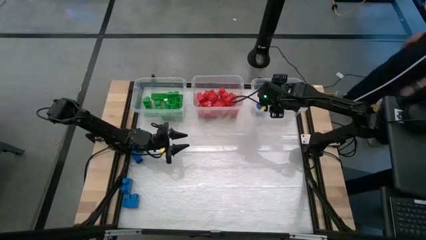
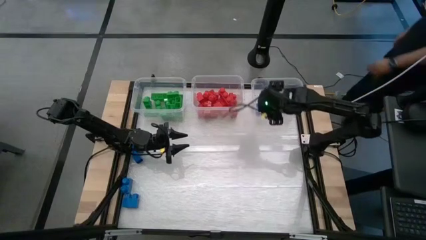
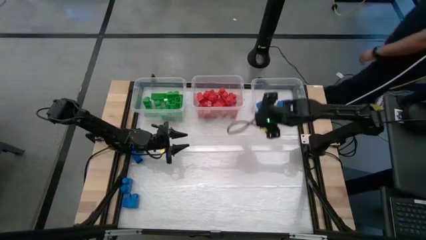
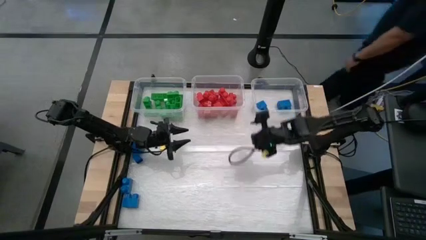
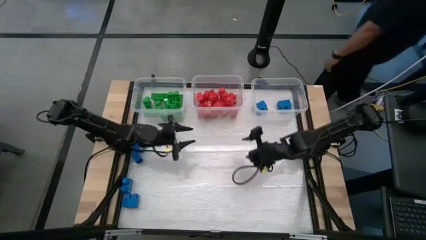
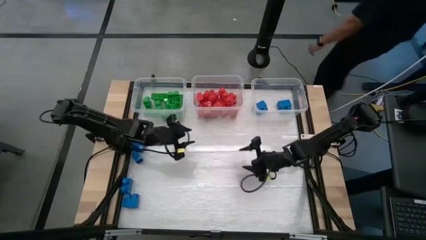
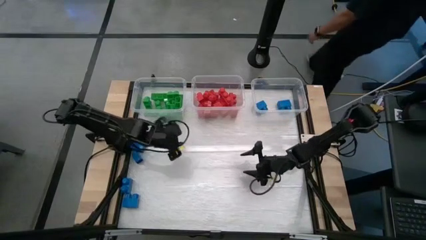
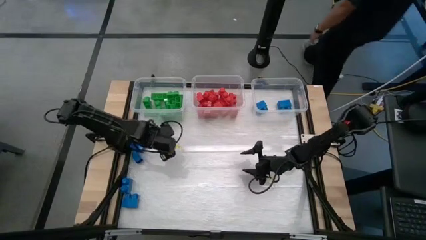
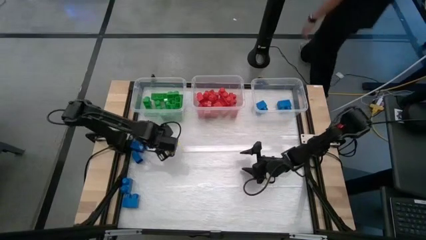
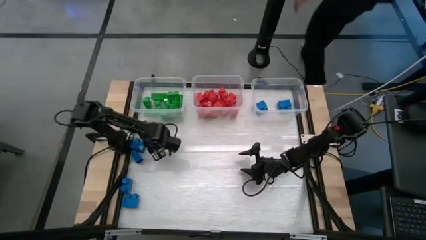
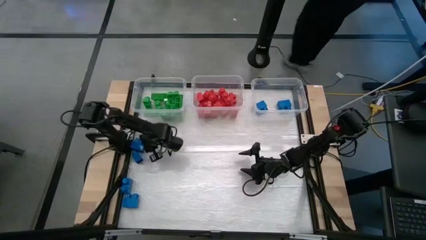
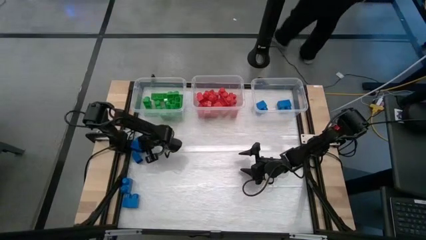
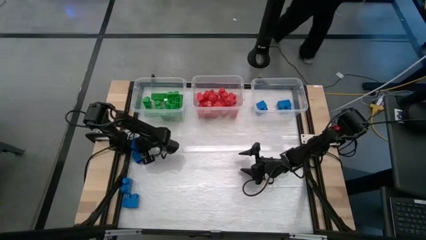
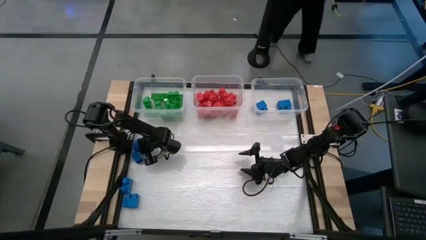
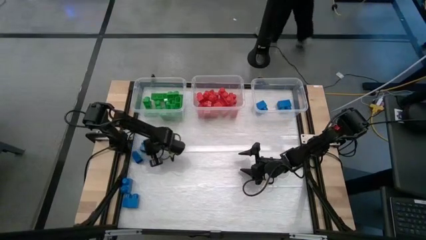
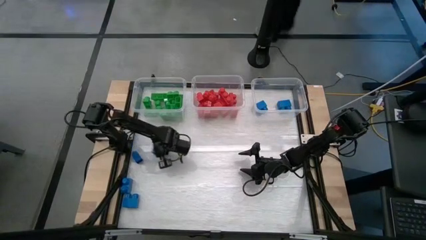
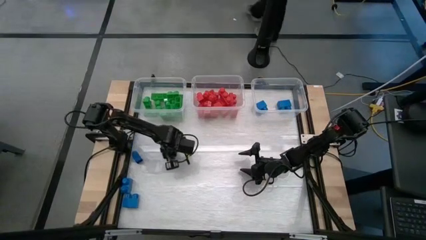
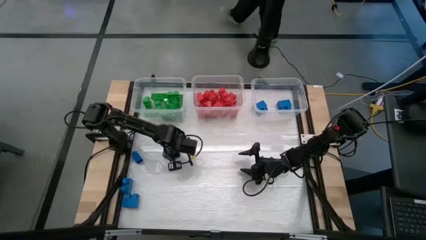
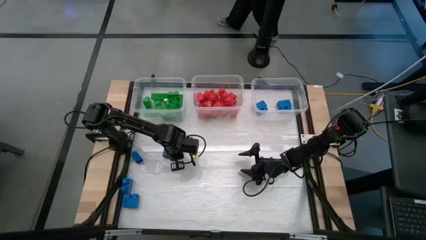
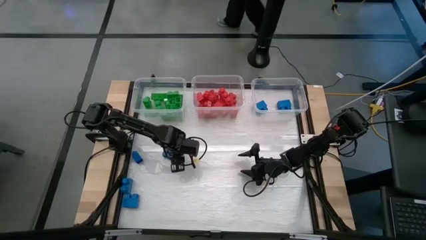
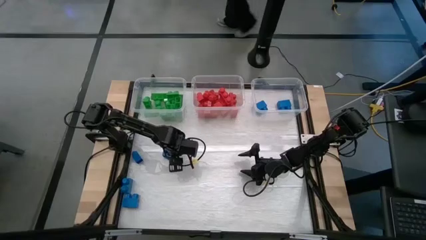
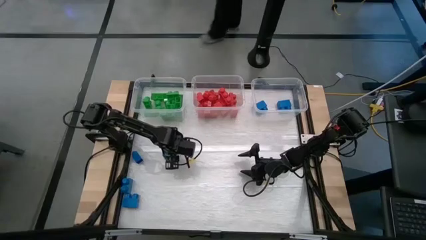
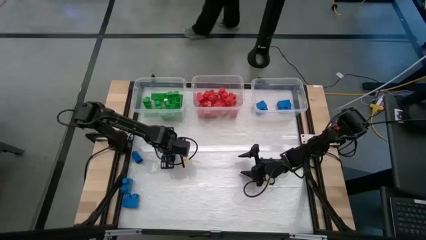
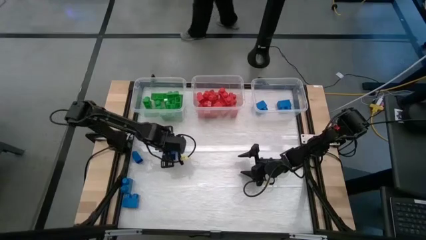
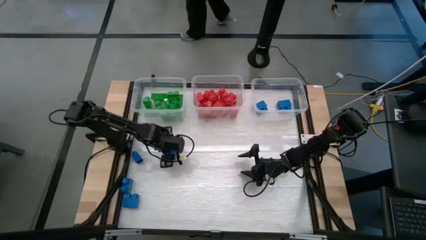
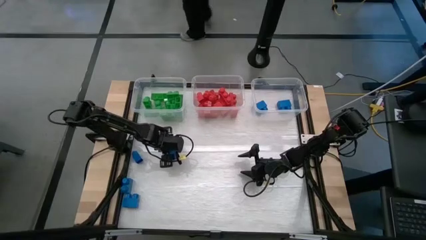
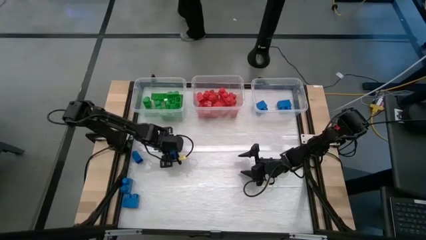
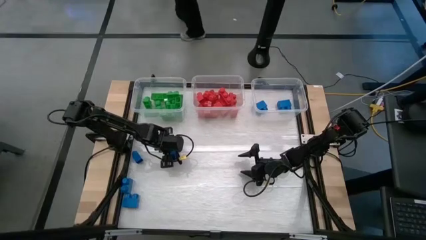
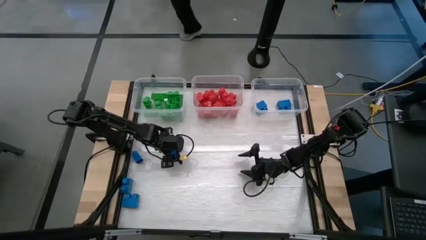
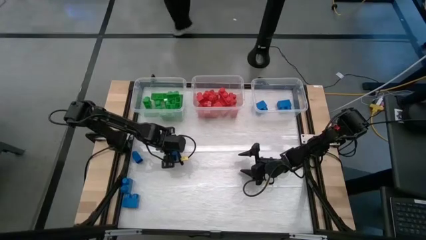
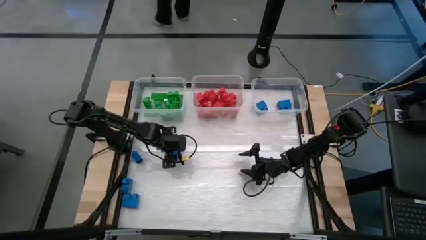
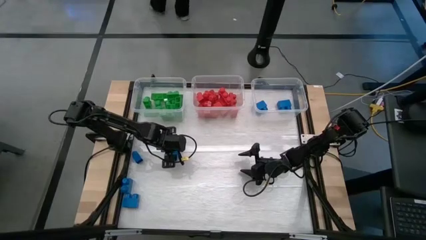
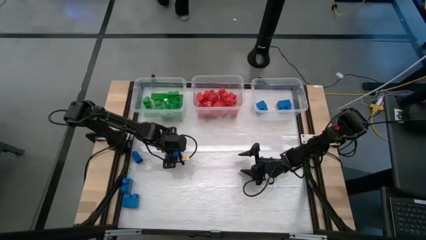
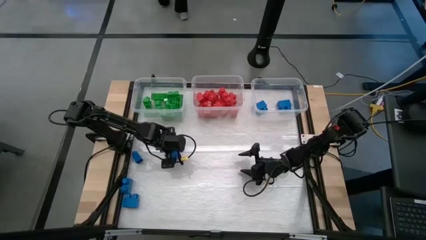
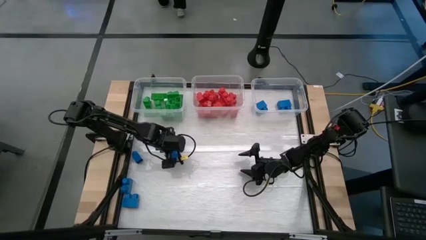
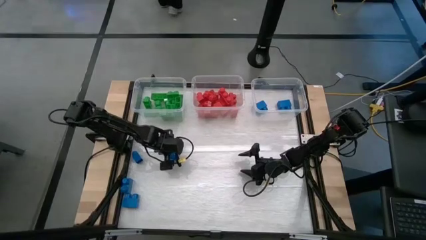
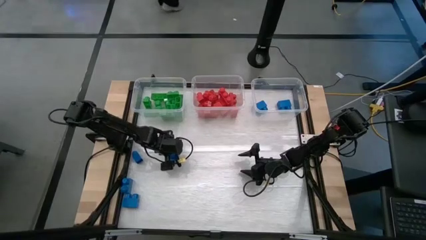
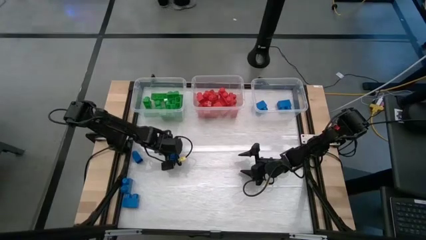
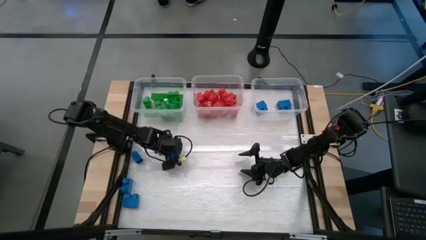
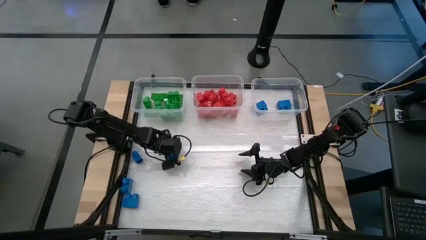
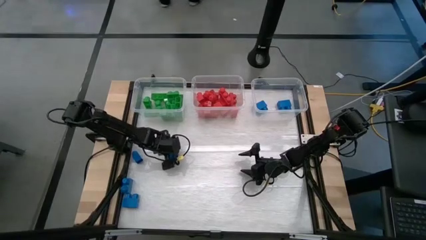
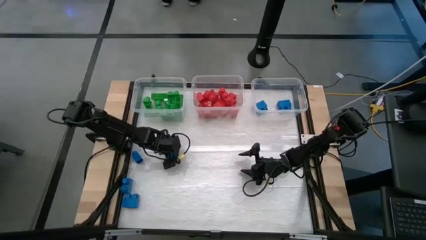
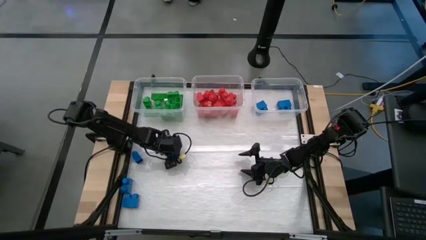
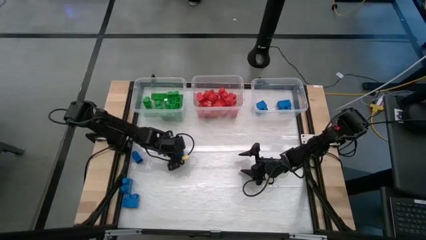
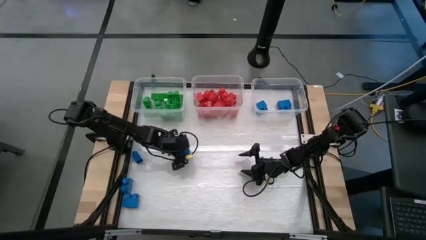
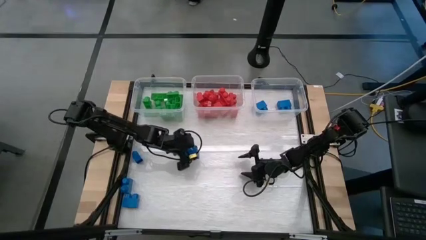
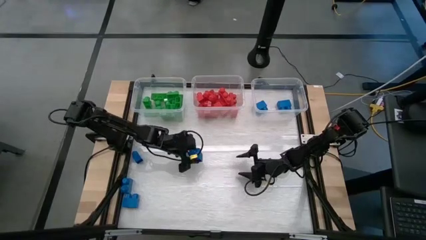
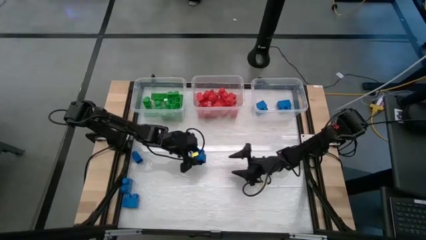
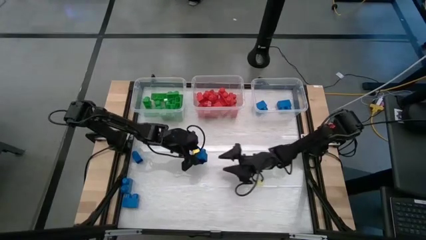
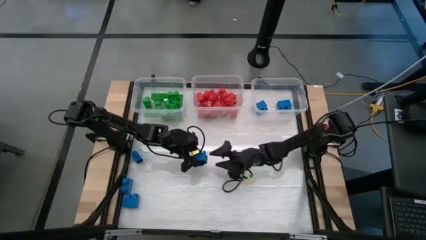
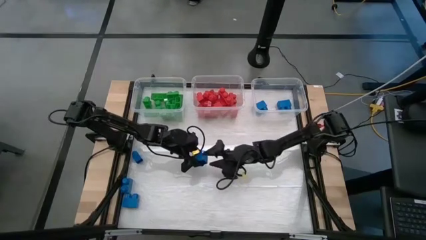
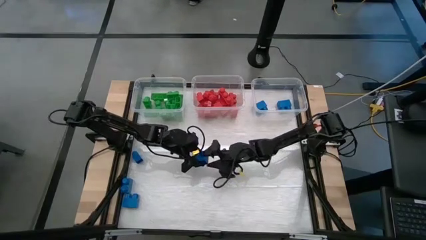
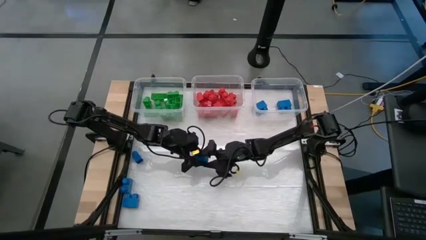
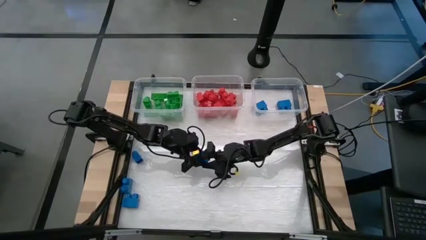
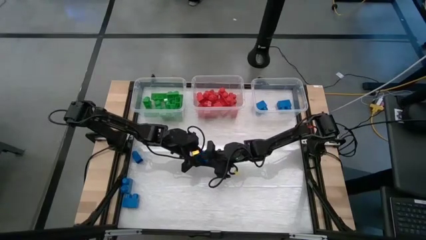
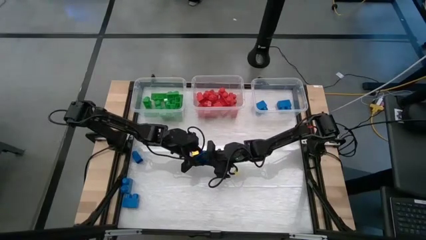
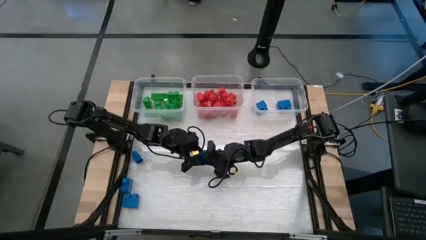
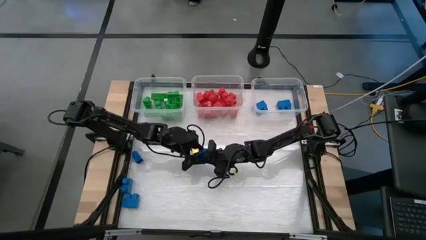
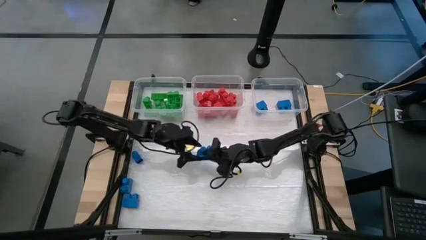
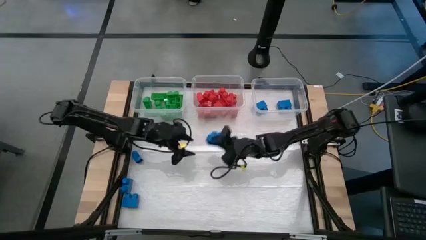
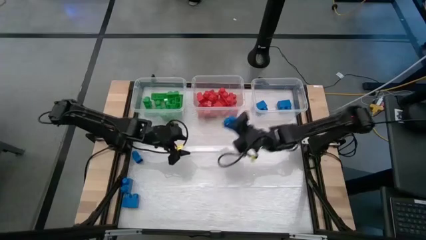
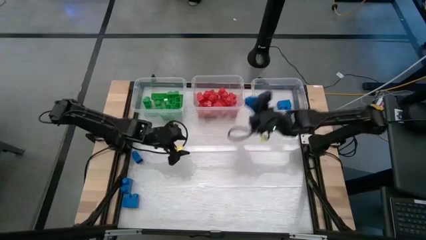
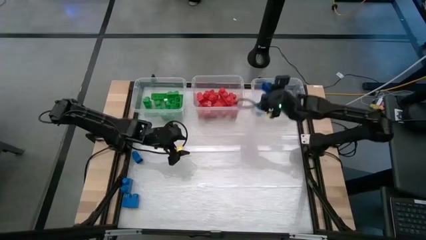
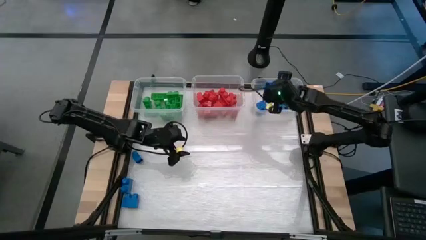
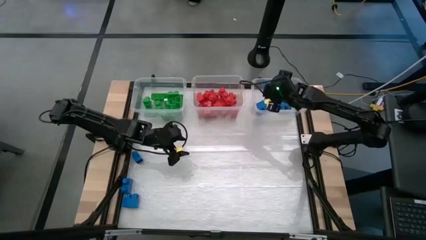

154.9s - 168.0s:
Task: Sort blocks
Put the blue game piece into the right transparent bin

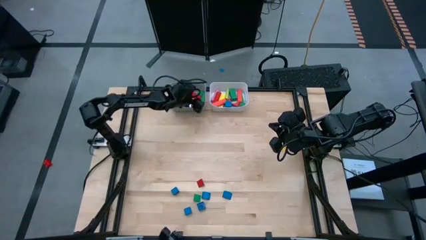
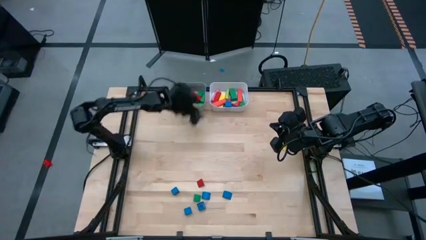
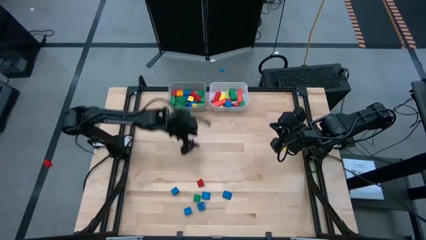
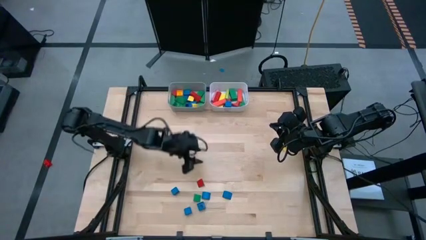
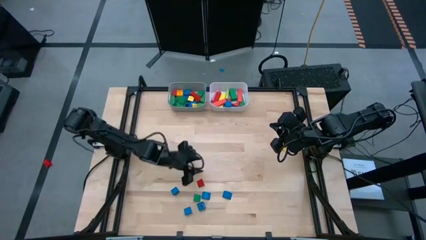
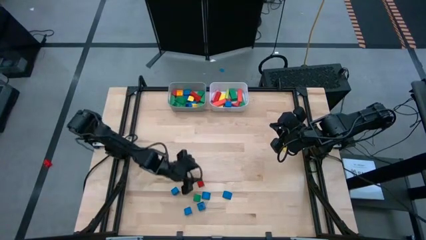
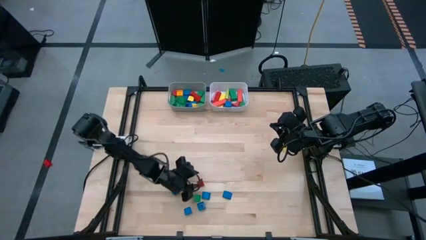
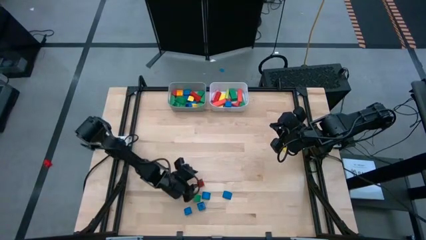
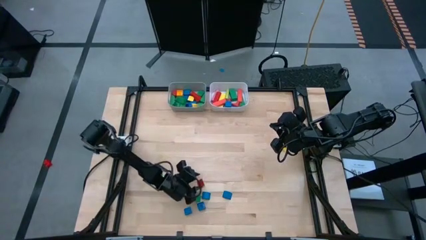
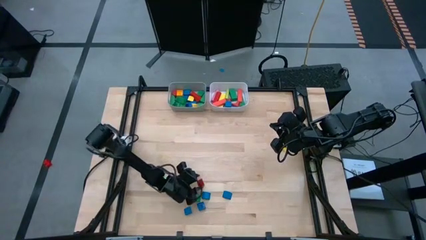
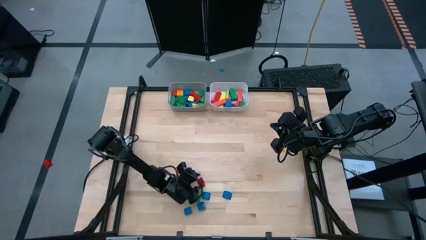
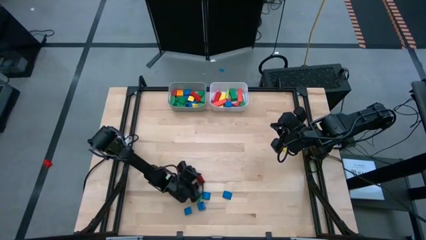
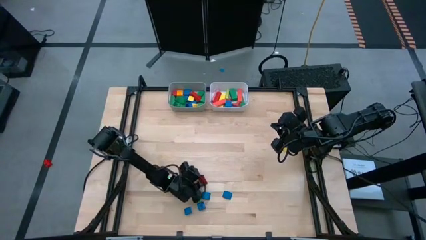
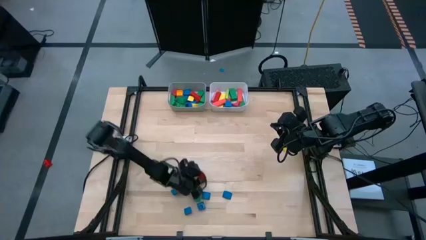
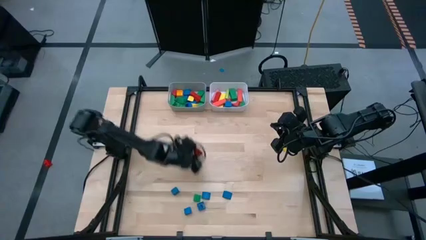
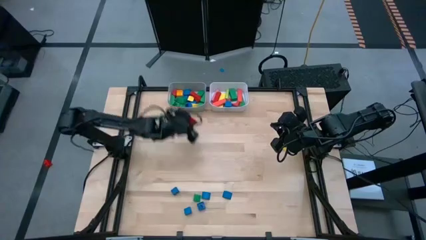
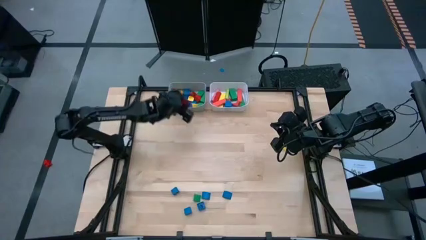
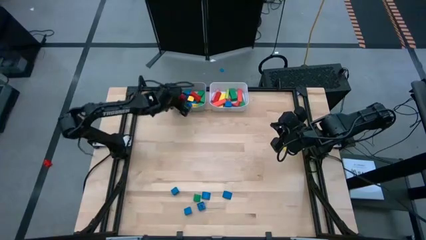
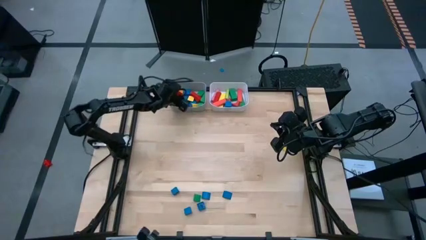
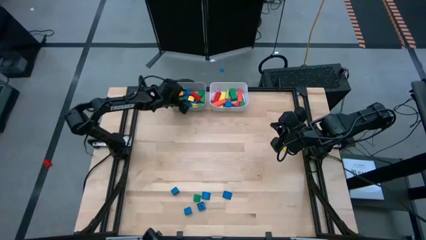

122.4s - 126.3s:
Task: Sort blocks by size
Put the red triangular block into the gray bin
